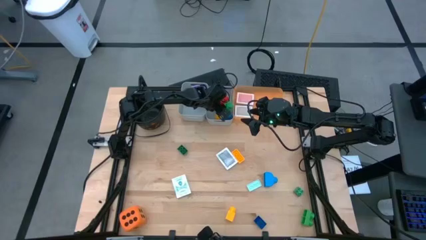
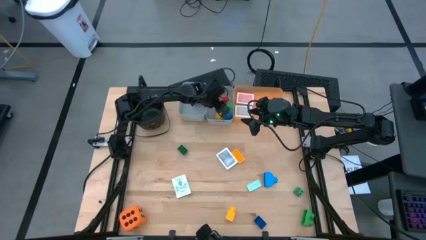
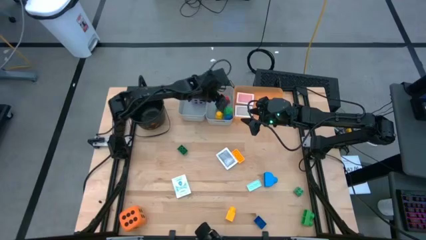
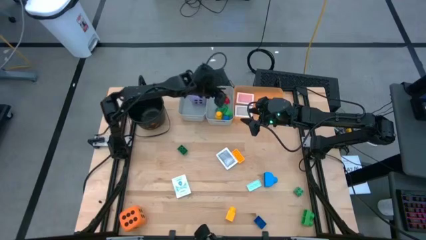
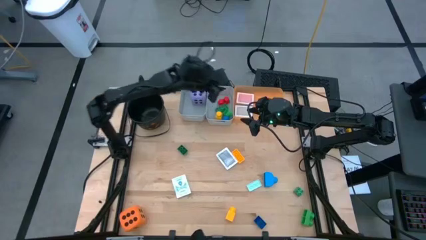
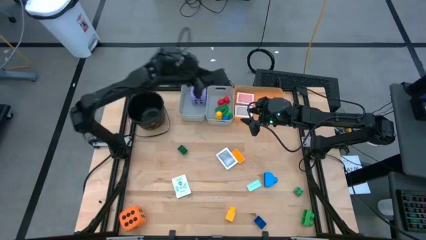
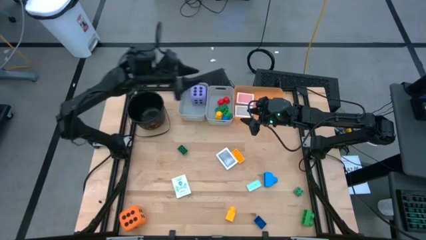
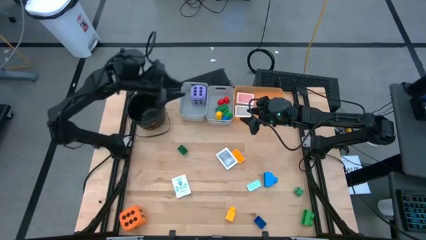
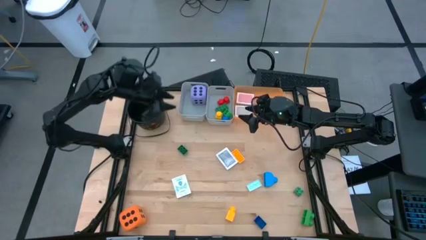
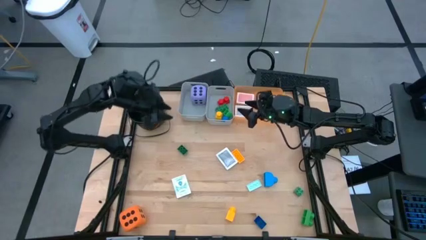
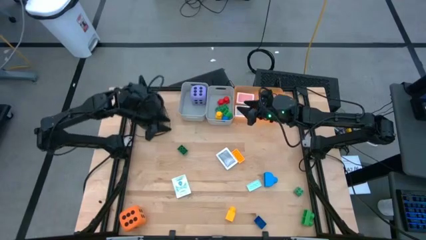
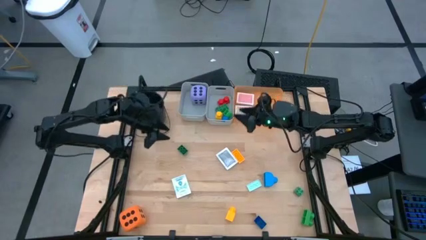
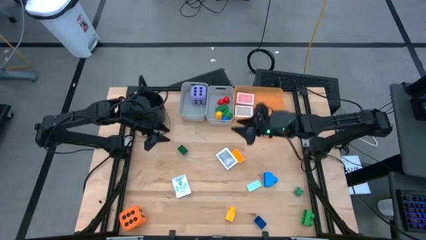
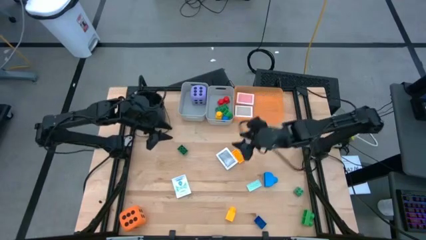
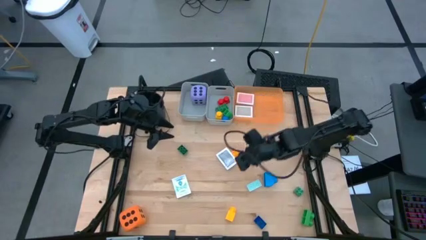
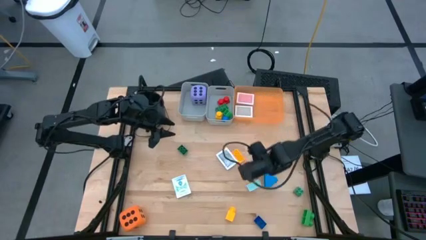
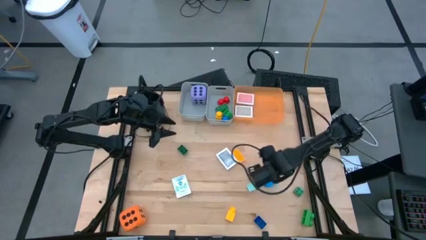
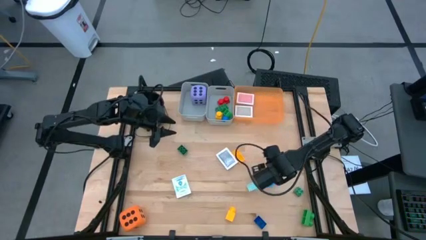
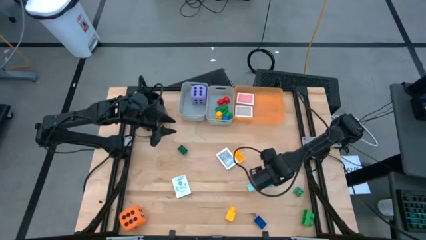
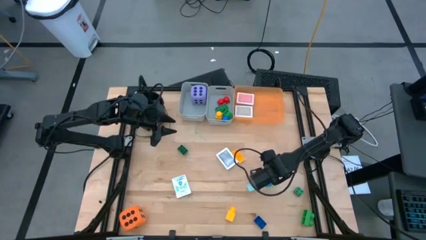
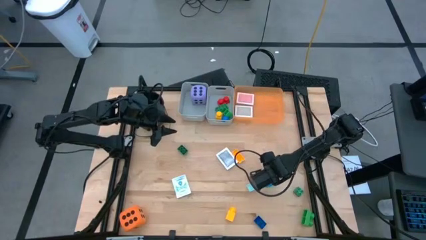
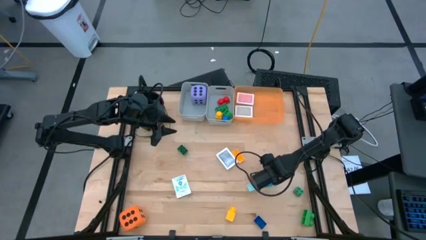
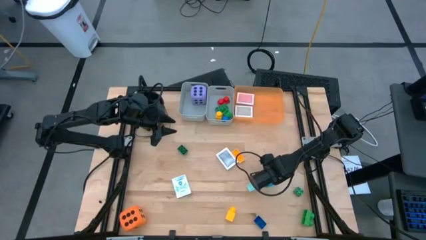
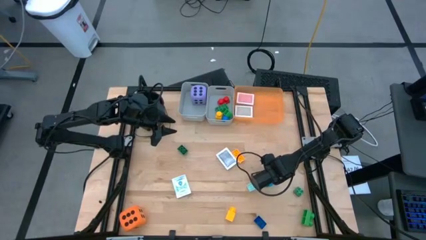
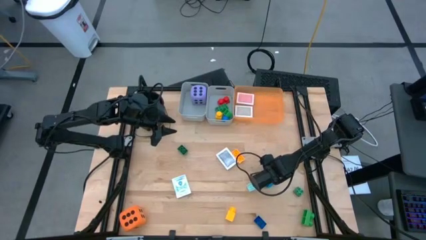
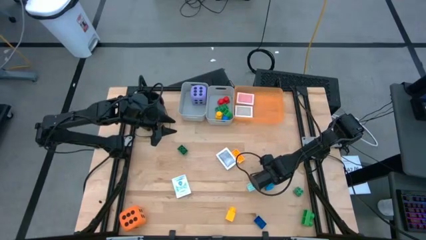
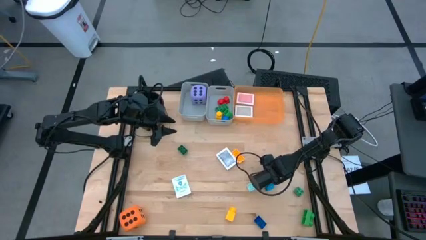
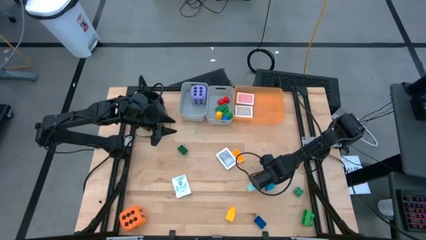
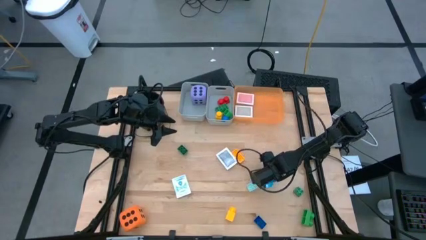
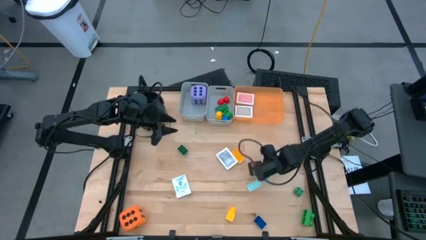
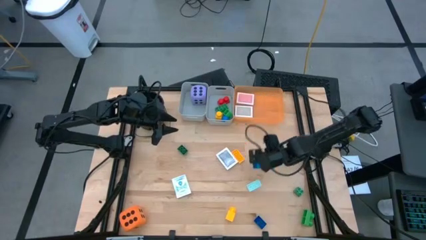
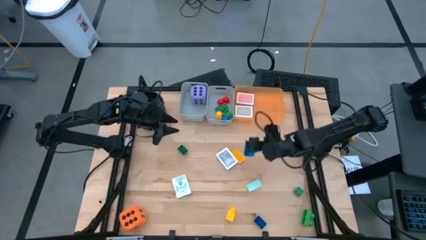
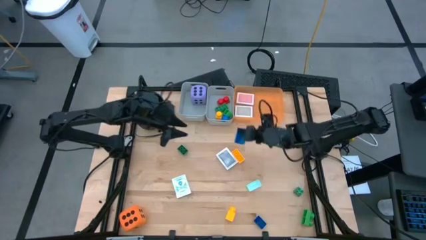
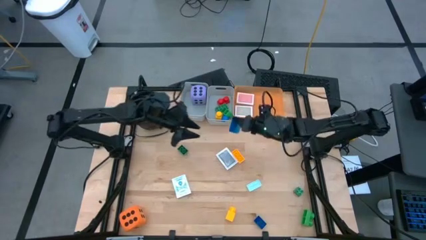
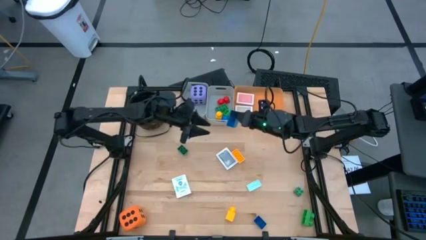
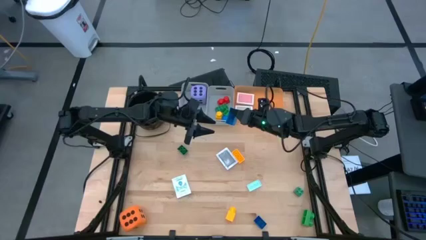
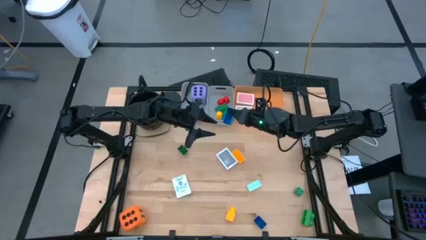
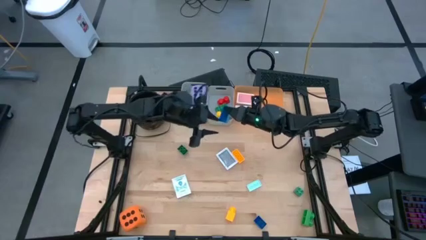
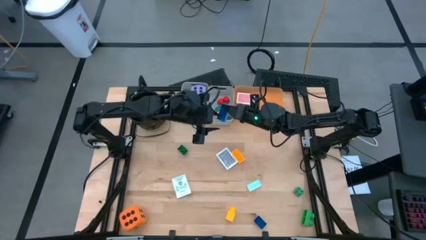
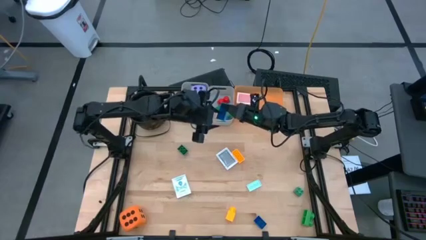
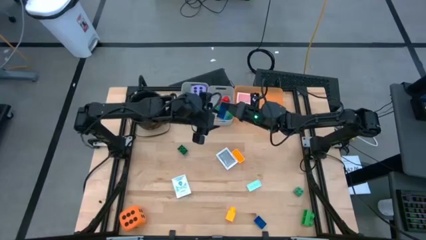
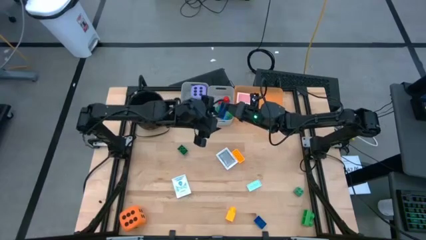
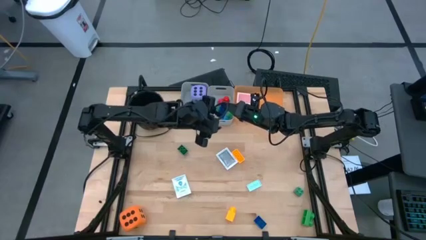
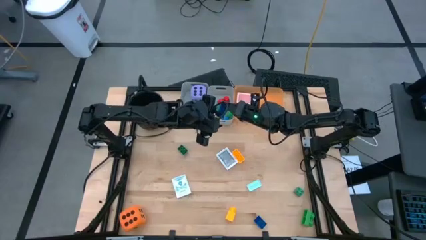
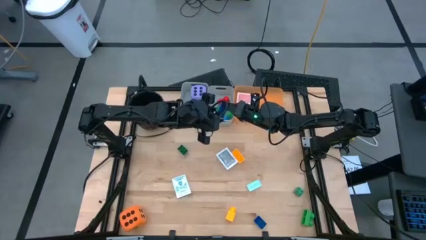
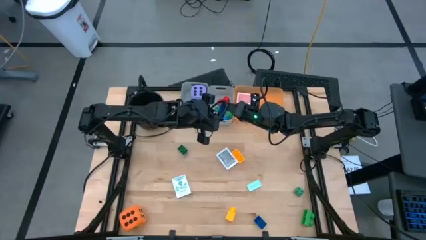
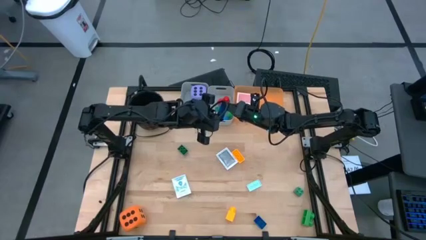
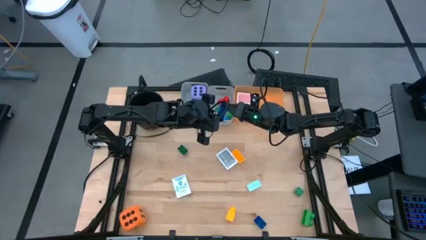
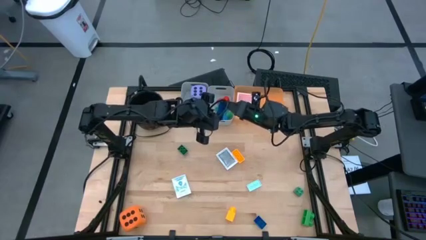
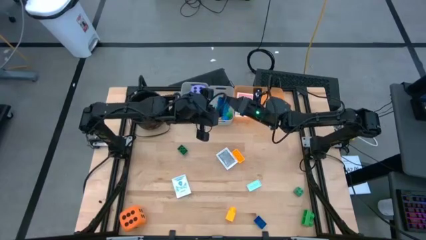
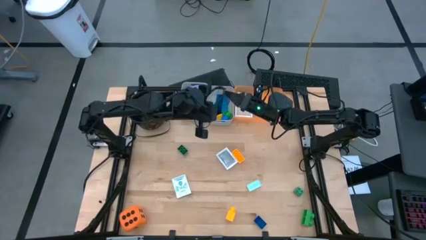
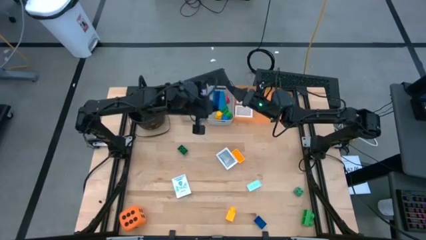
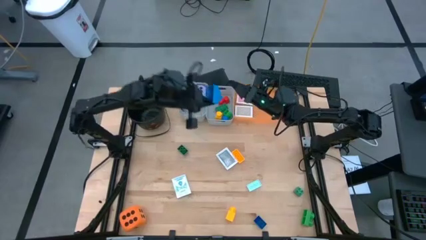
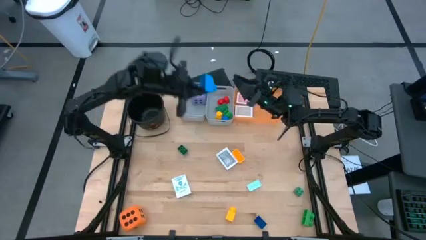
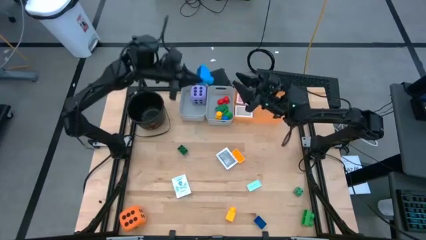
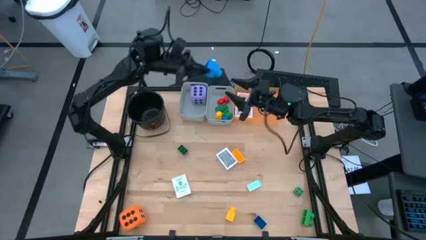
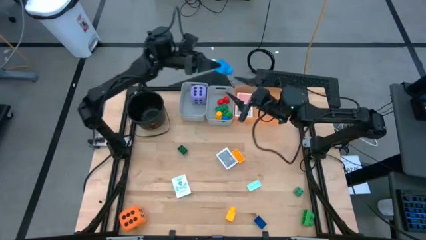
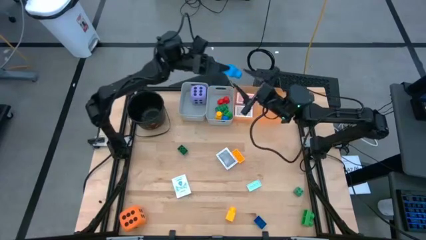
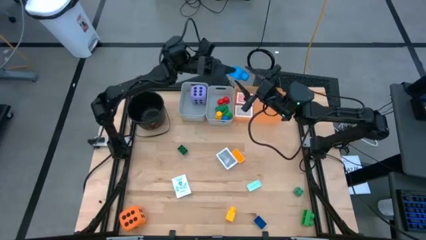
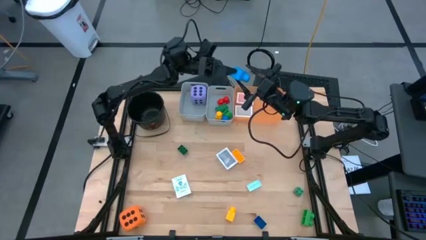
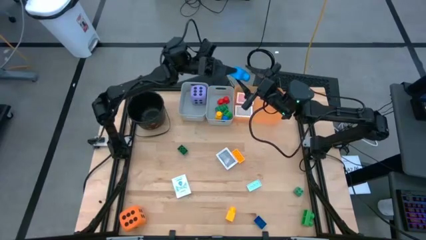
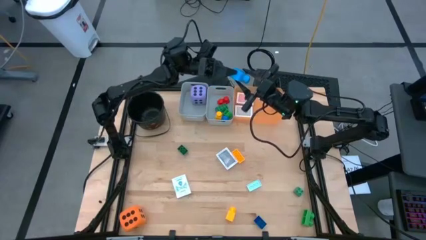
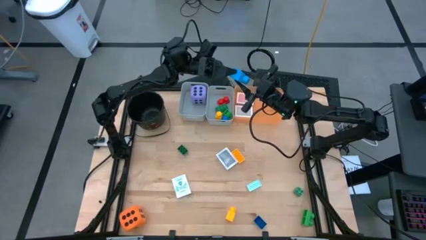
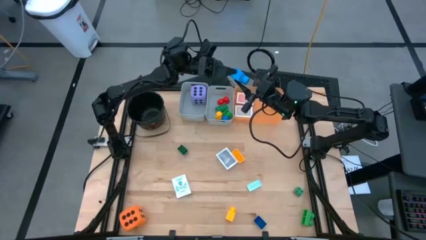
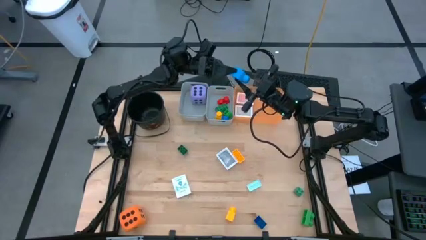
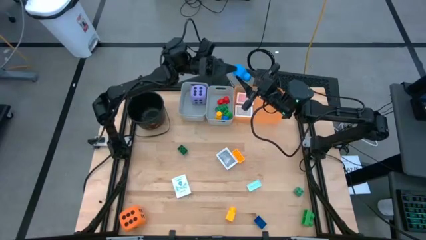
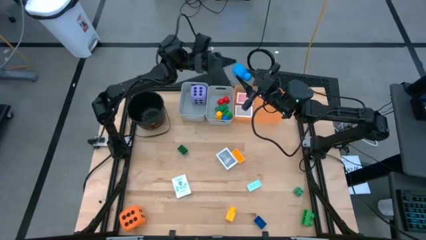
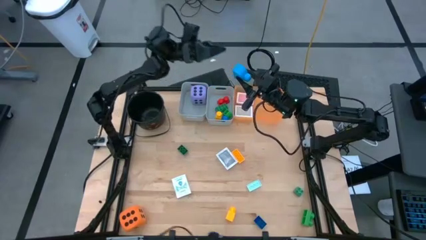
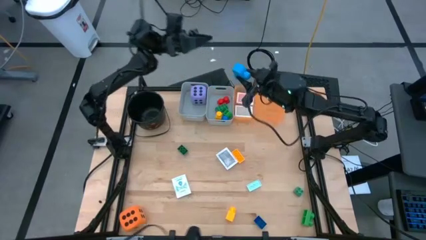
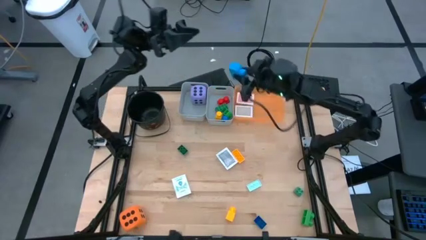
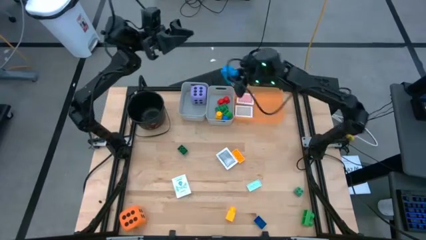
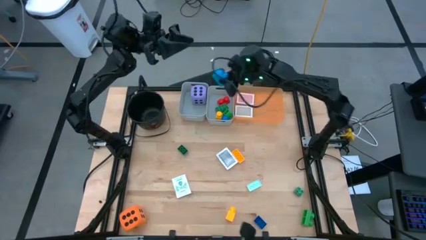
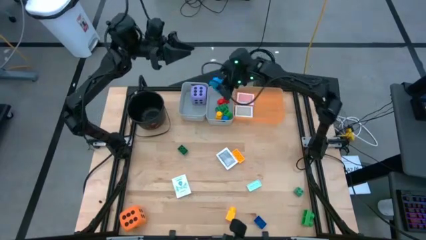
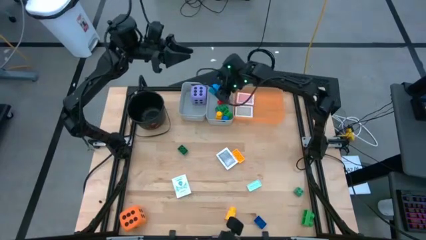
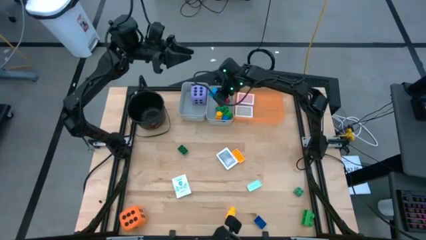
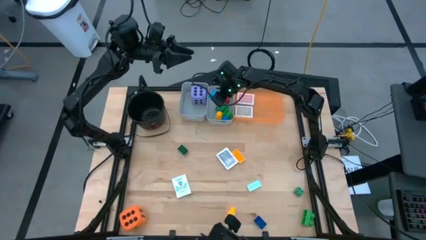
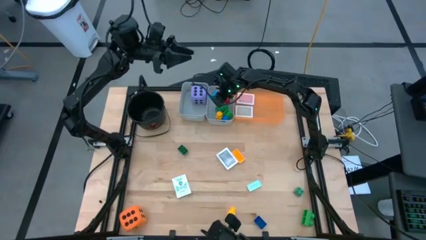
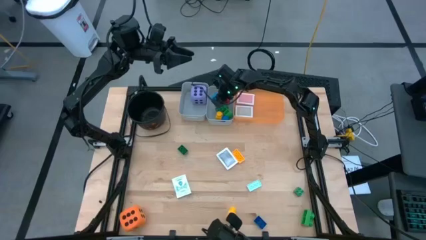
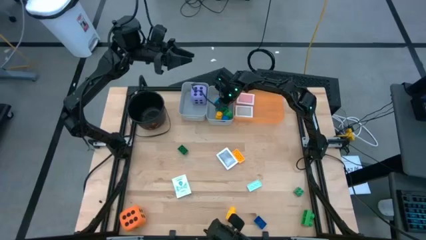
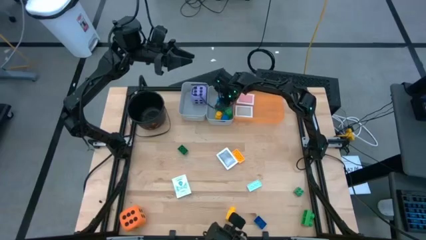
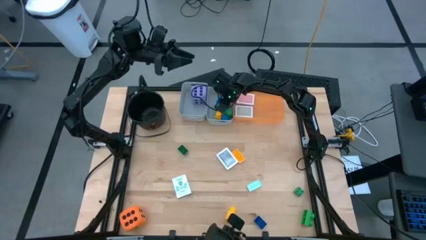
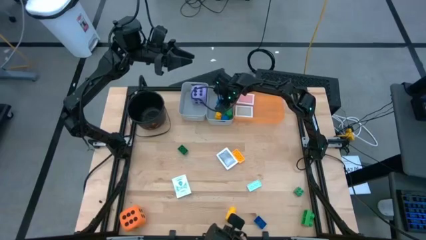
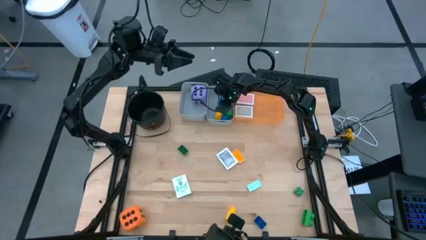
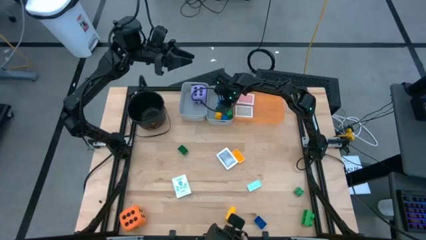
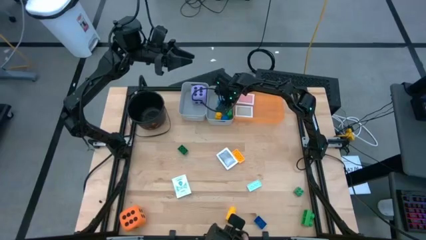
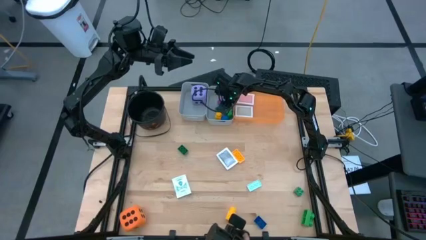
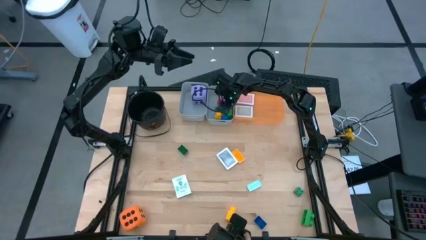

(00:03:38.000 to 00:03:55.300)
Task: Pick & Place Toys
Put the blue gamepiece into the right gray bin
